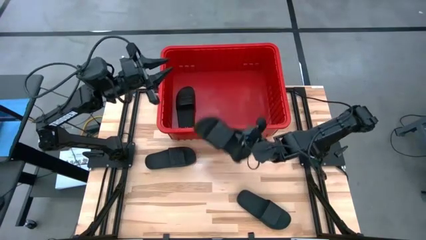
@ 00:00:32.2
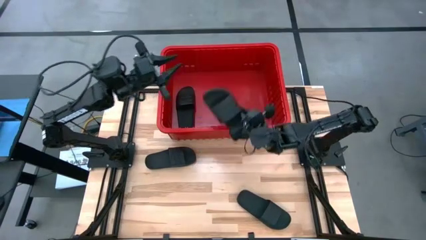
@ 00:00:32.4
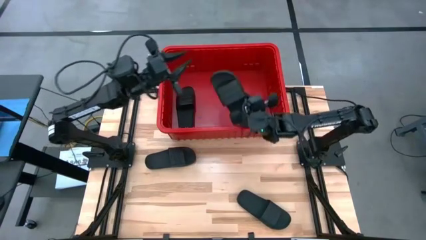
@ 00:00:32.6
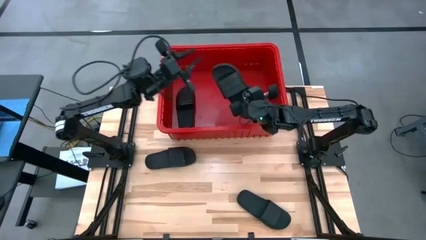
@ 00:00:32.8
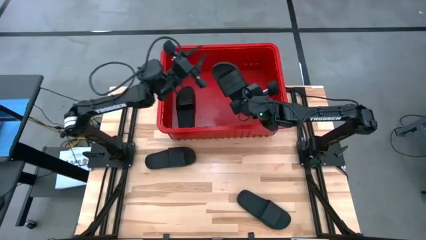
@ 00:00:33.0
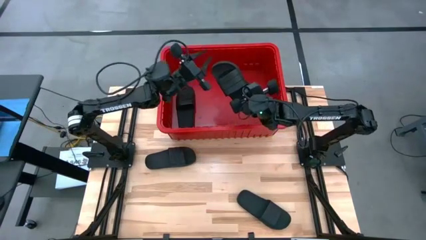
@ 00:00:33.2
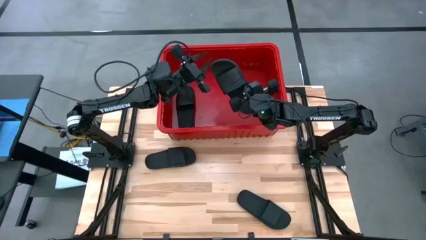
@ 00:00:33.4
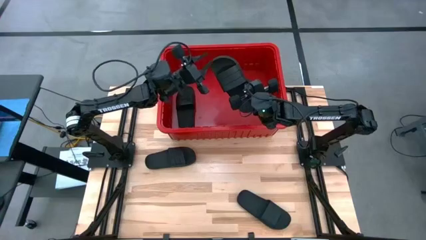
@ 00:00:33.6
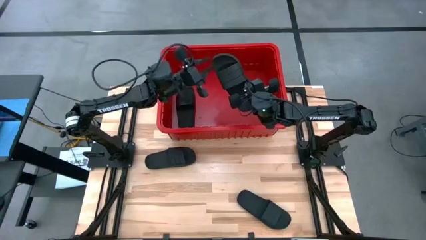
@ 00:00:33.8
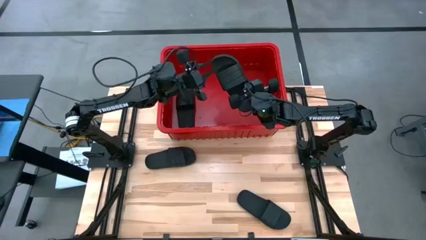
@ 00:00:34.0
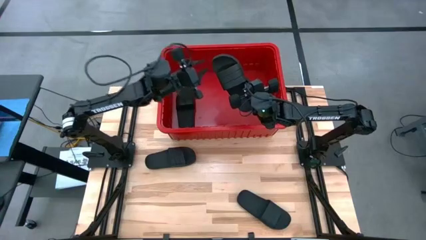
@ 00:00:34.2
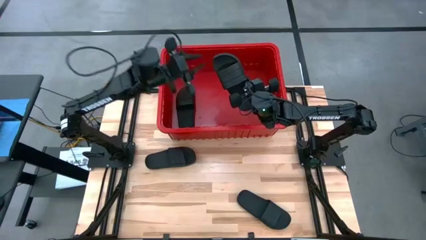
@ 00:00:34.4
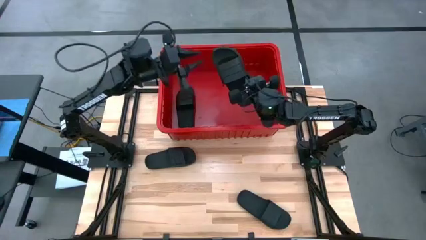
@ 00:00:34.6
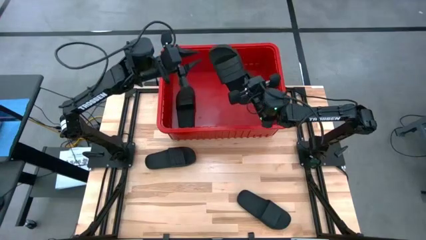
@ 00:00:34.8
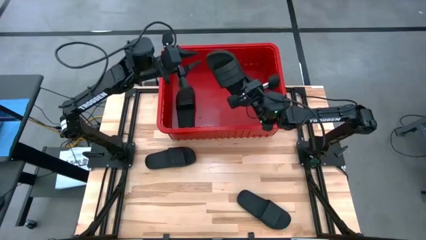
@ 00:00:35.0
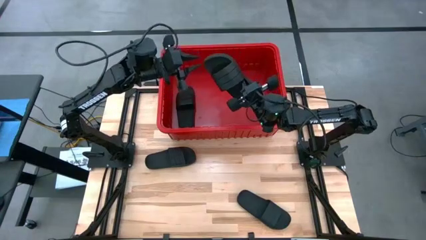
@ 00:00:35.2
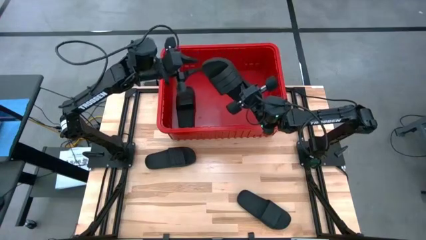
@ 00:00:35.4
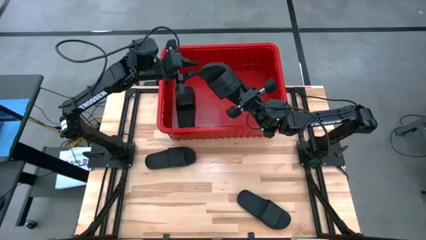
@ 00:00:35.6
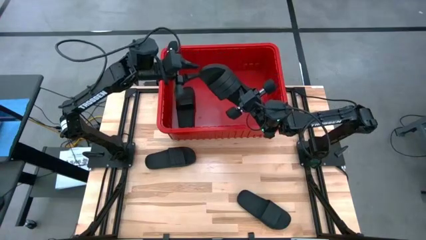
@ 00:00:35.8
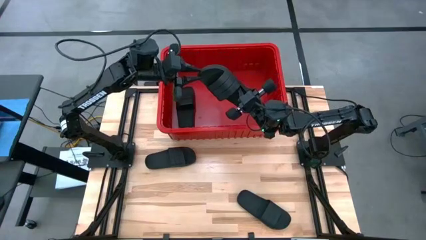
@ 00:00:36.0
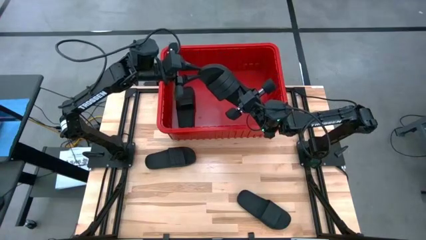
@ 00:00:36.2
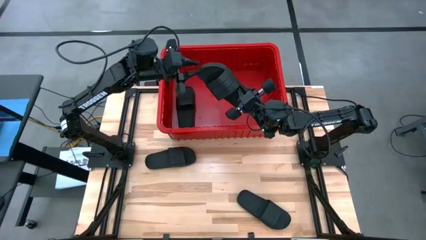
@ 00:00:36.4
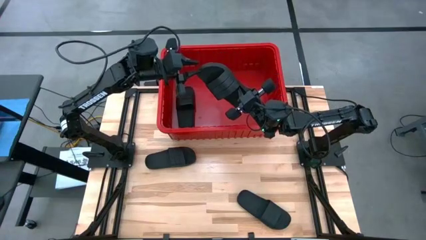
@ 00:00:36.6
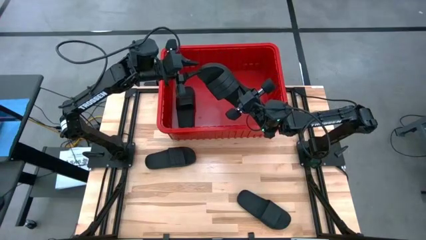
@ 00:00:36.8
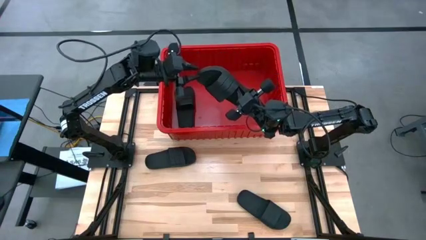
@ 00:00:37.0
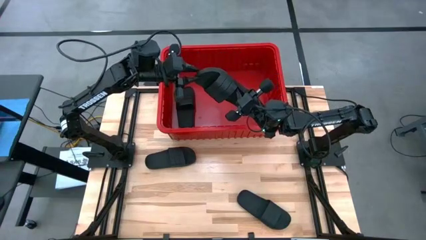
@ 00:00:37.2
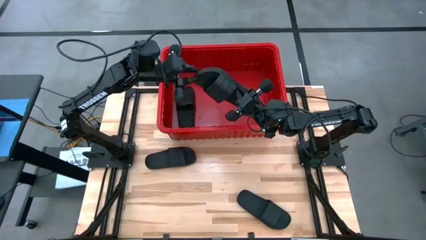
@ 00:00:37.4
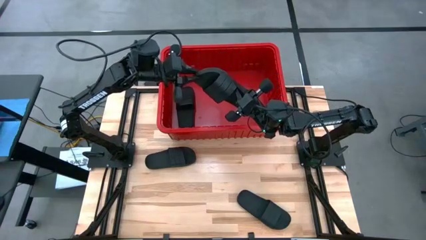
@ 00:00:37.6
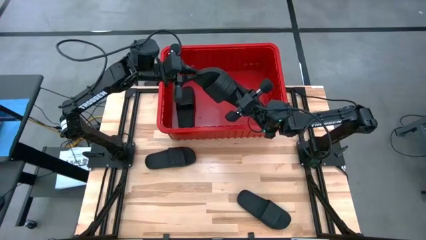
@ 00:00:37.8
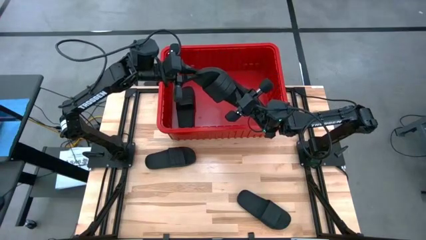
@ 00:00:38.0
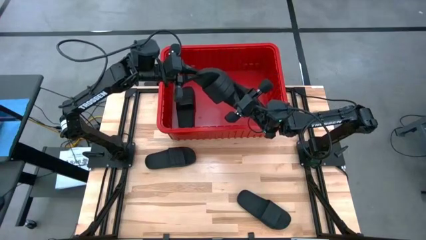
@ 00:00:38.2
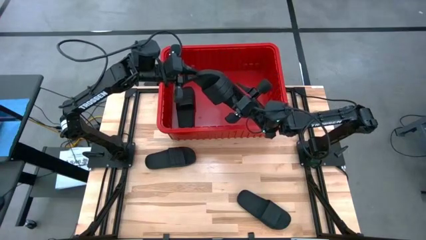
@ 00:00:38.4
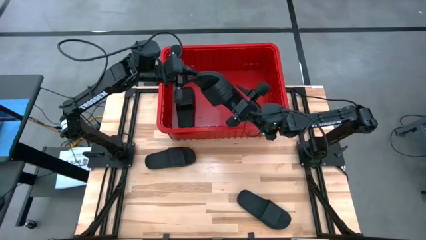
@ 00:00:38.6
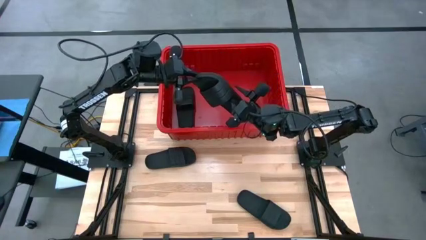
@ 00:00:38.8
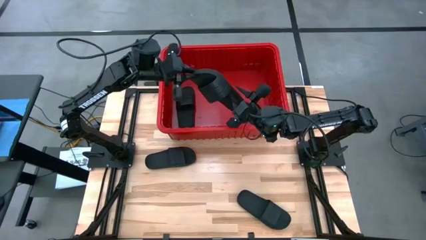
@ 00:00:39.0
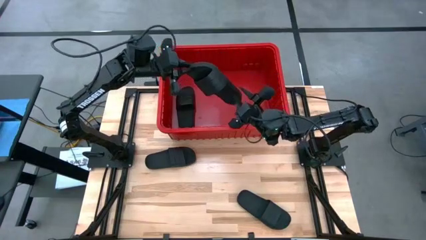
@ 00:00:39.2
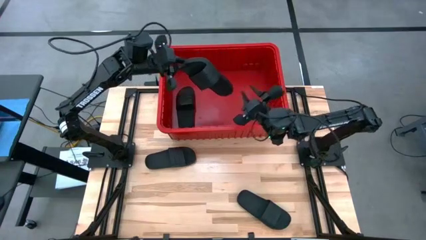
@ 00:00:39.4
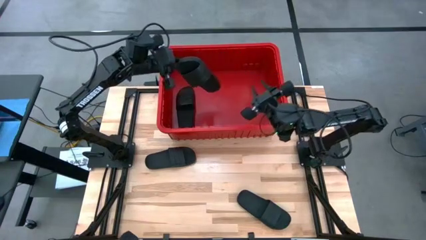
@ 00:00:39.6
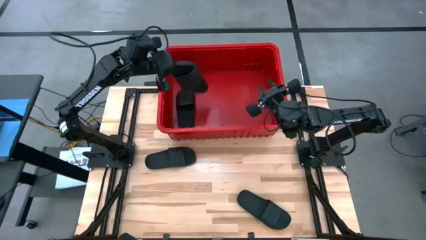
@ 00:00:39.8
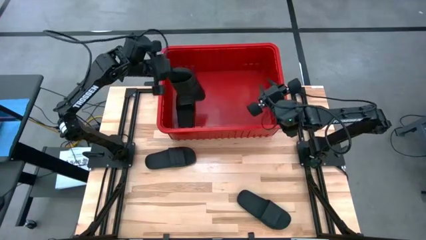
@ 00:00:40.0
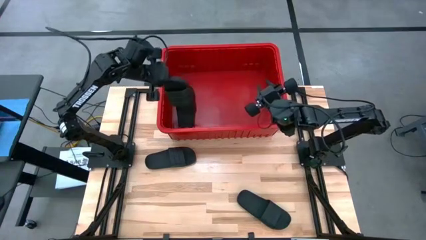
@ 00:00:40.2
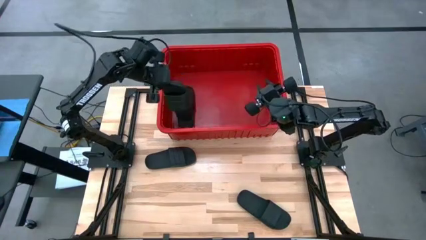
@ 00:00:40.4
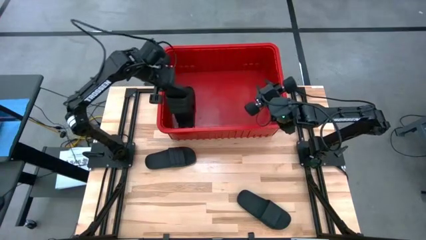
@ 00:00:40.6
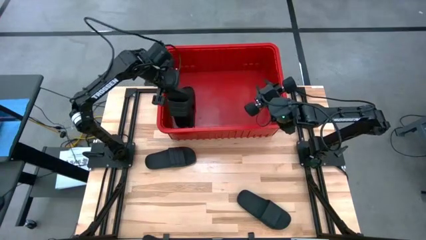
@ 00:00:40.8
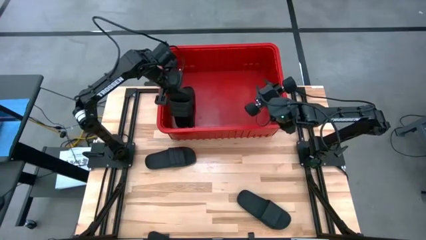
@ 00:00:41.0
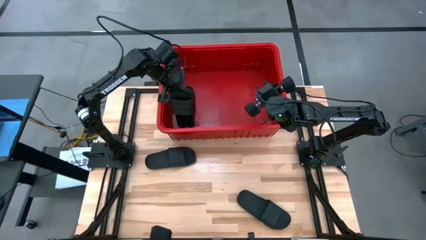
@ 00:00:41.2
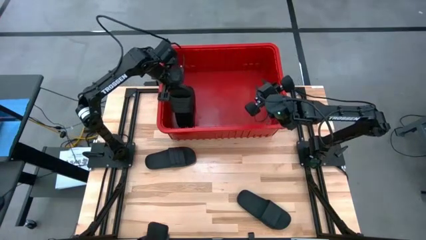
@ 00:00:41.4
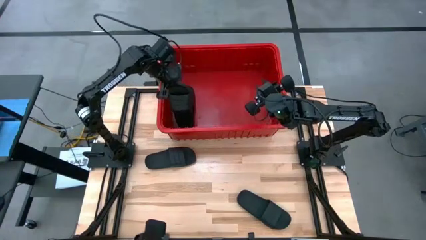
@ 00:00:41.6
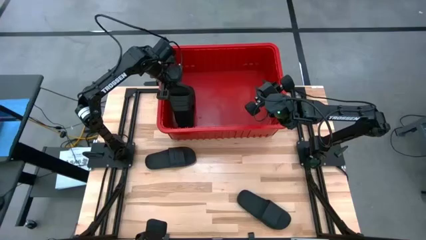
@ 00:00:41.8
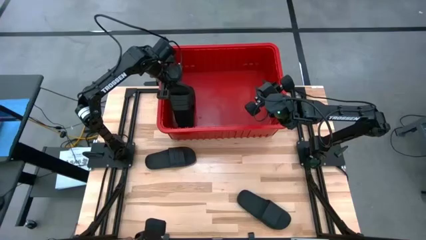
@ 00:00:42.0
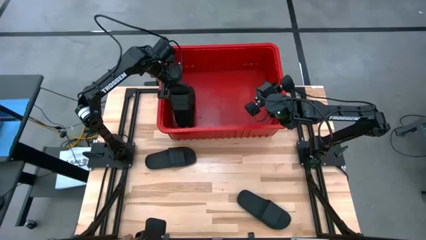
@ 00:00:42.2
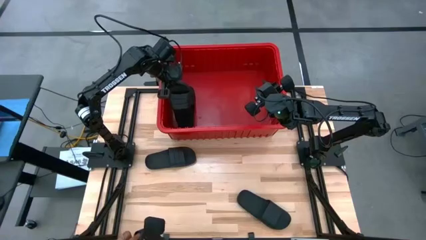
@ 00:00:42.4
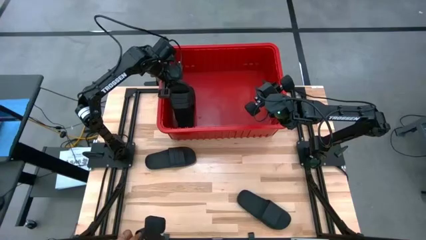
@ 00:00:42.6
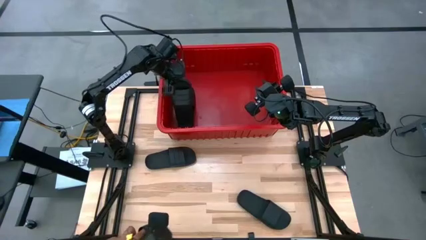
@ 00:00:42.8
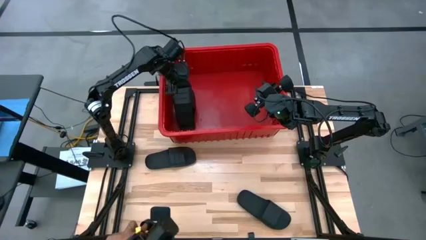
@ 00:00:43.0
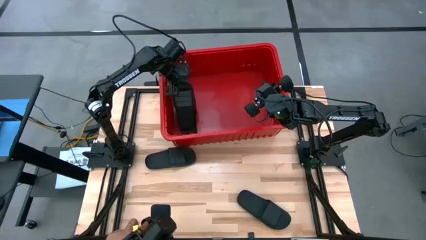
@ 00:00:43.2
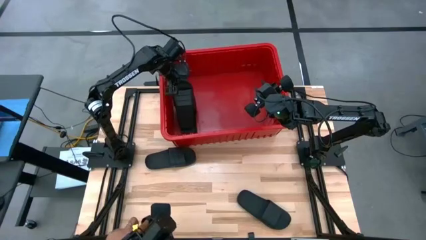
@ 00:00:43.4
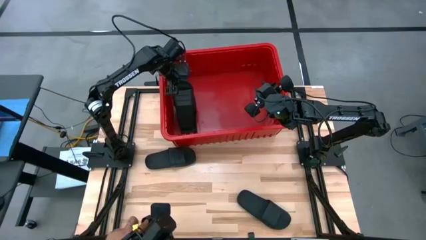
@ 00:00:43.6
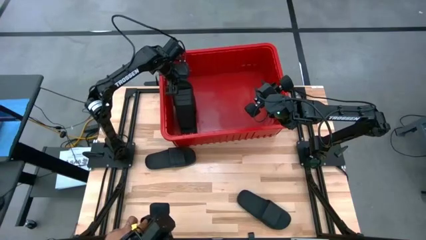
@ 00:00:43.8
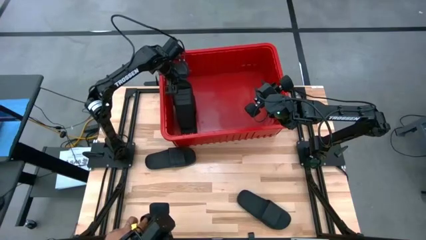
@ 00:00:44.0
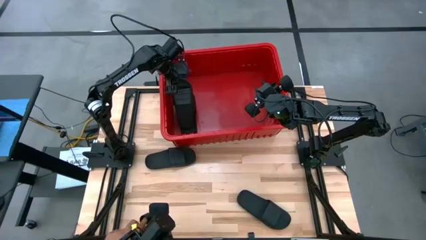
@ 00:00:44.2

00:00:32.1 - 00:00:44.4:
Task: Pick and place slides into bin
Put the black slide into the red bin
